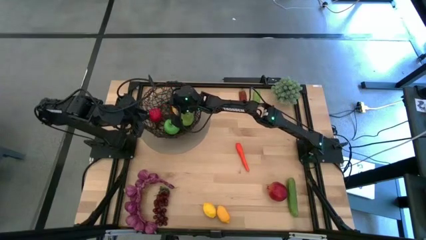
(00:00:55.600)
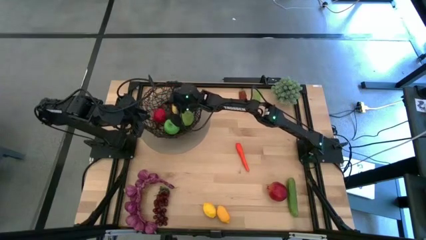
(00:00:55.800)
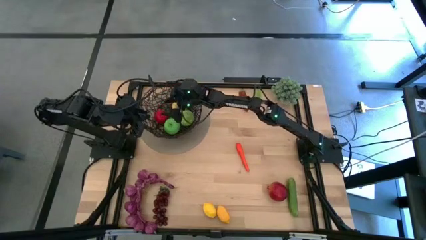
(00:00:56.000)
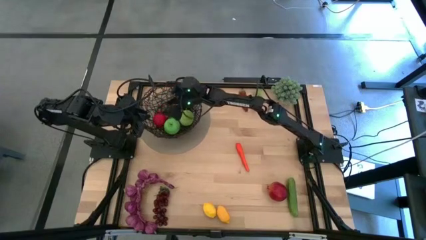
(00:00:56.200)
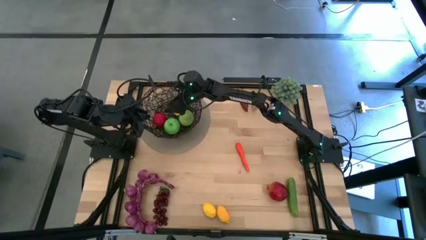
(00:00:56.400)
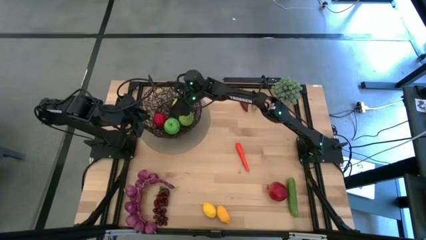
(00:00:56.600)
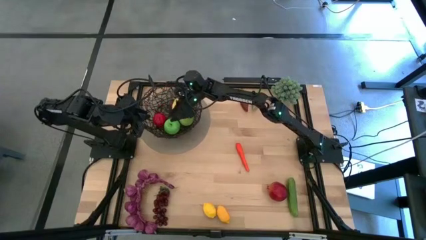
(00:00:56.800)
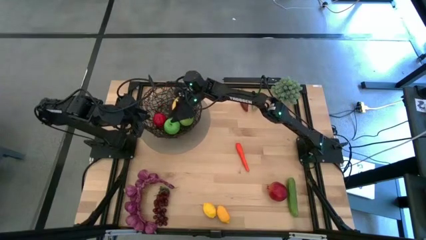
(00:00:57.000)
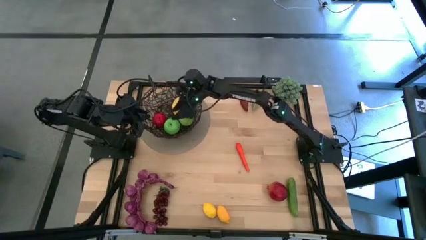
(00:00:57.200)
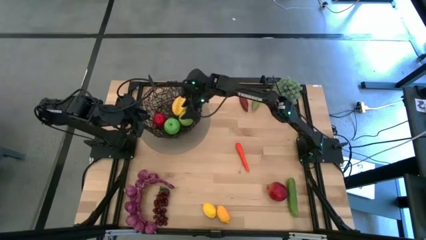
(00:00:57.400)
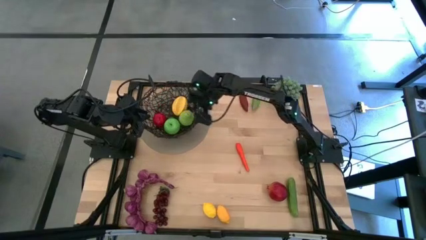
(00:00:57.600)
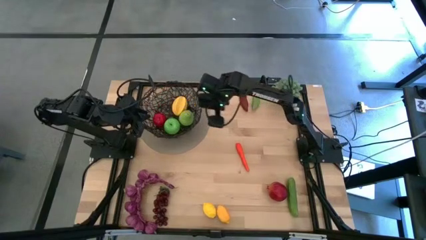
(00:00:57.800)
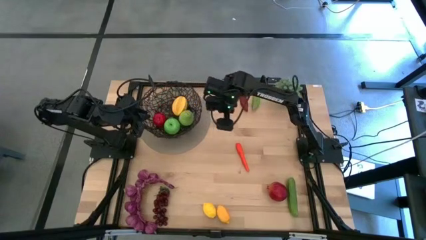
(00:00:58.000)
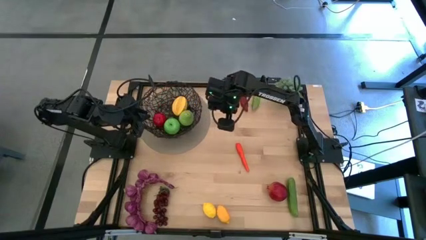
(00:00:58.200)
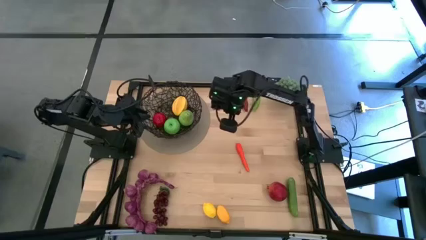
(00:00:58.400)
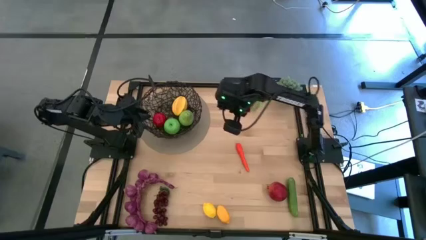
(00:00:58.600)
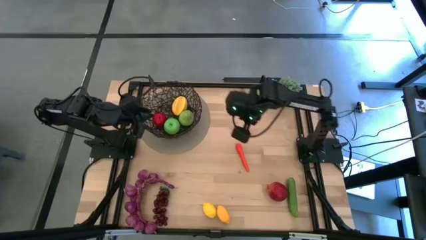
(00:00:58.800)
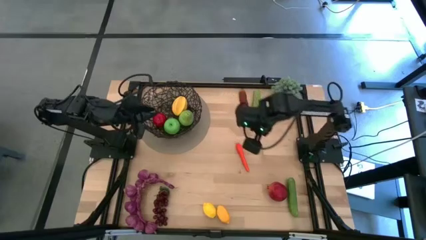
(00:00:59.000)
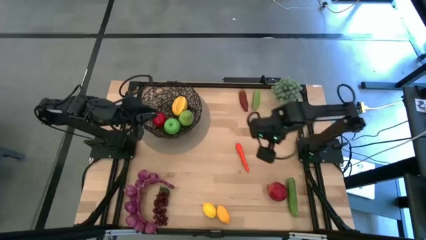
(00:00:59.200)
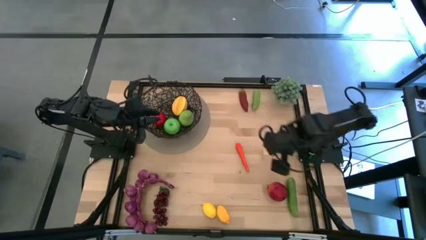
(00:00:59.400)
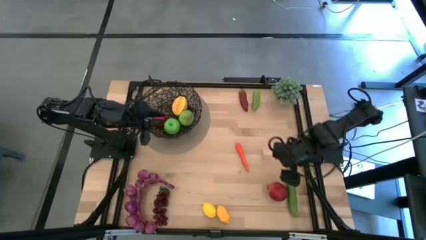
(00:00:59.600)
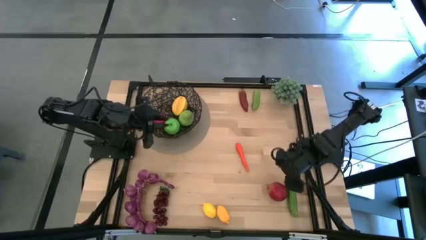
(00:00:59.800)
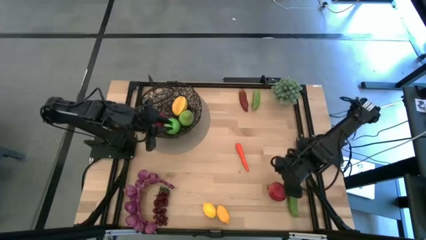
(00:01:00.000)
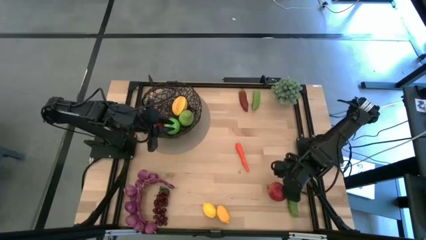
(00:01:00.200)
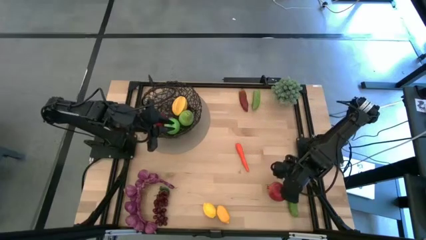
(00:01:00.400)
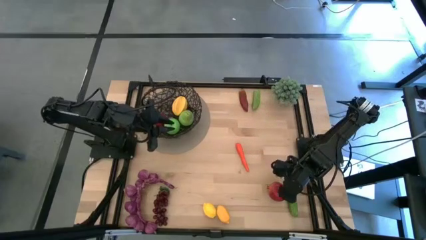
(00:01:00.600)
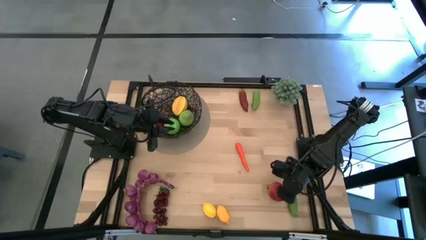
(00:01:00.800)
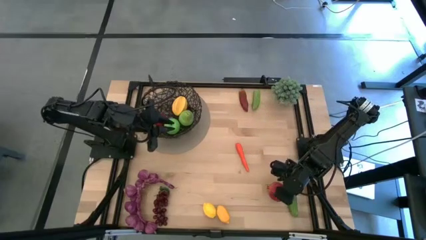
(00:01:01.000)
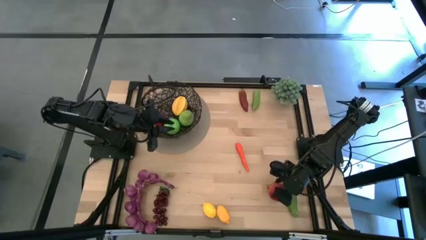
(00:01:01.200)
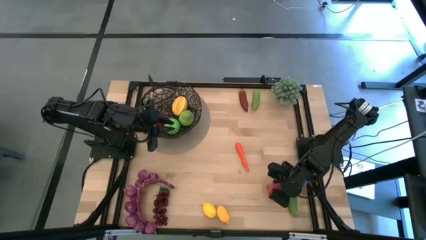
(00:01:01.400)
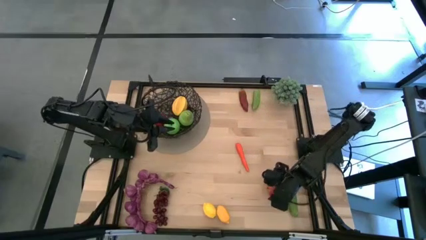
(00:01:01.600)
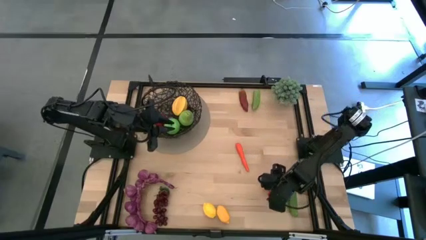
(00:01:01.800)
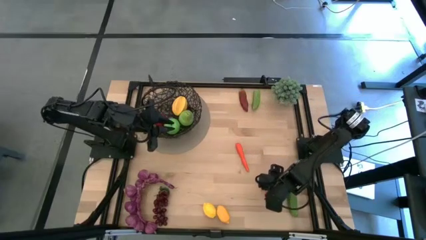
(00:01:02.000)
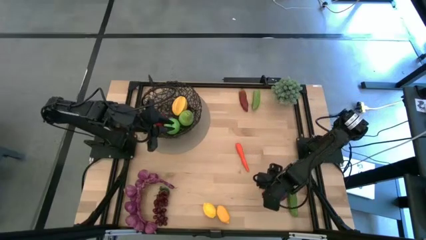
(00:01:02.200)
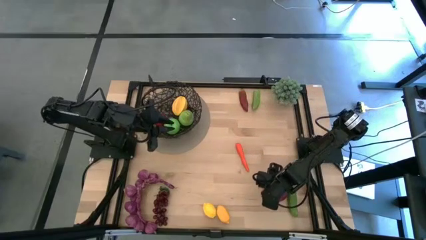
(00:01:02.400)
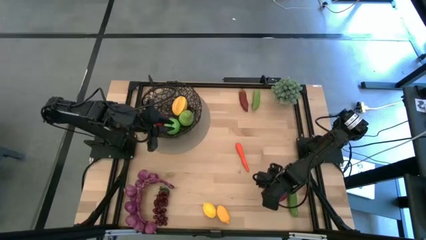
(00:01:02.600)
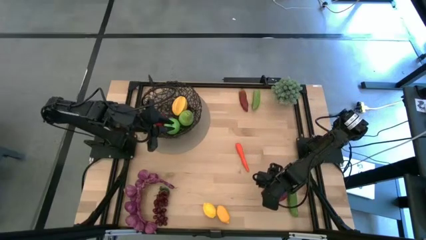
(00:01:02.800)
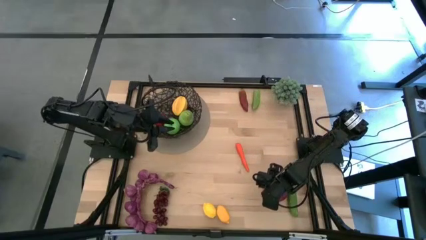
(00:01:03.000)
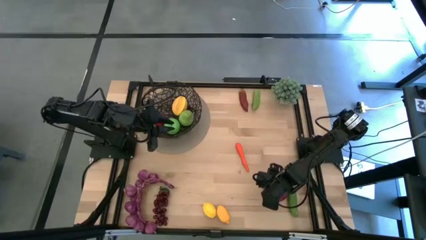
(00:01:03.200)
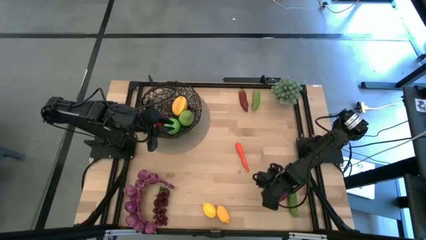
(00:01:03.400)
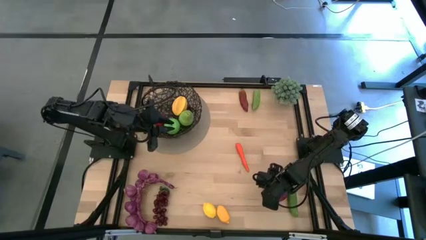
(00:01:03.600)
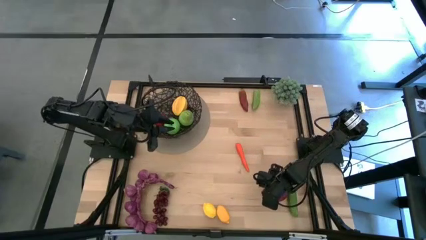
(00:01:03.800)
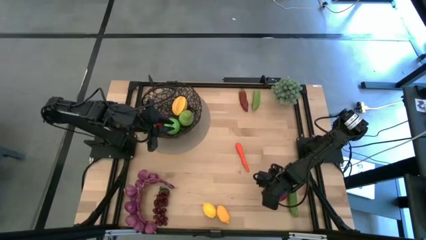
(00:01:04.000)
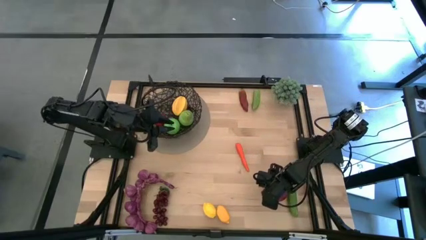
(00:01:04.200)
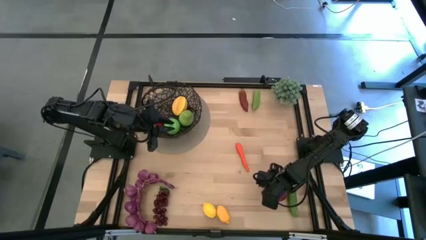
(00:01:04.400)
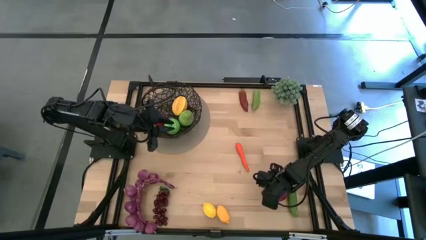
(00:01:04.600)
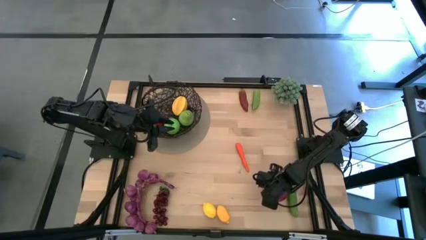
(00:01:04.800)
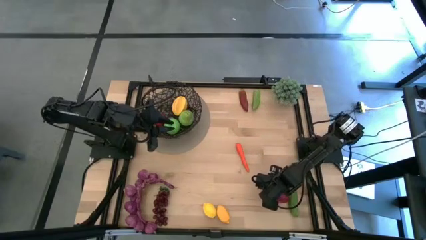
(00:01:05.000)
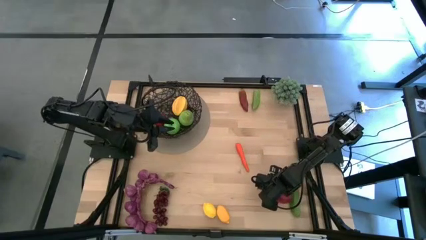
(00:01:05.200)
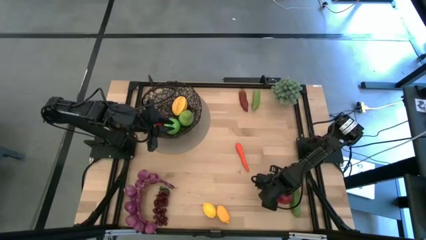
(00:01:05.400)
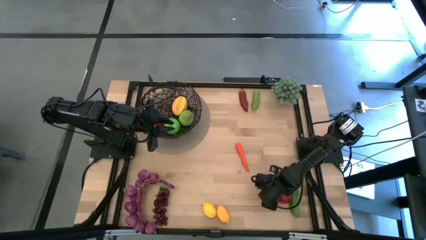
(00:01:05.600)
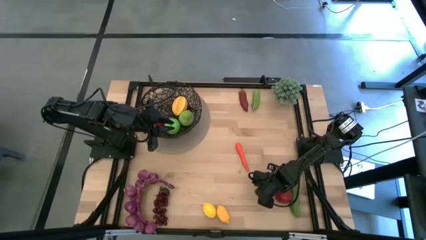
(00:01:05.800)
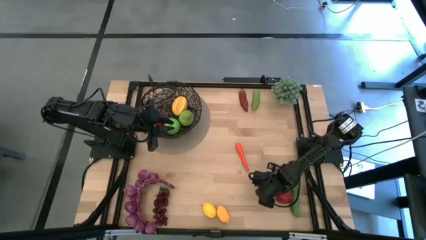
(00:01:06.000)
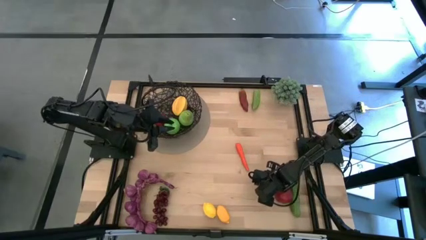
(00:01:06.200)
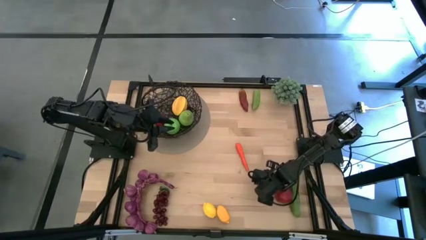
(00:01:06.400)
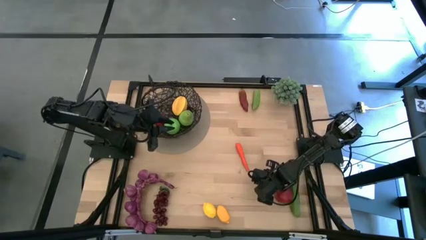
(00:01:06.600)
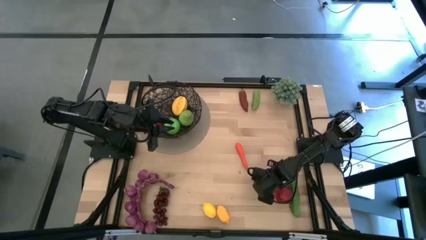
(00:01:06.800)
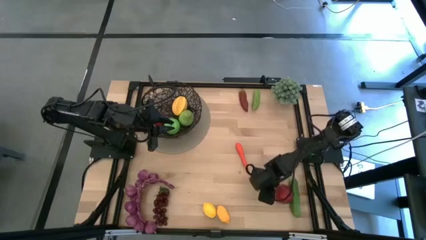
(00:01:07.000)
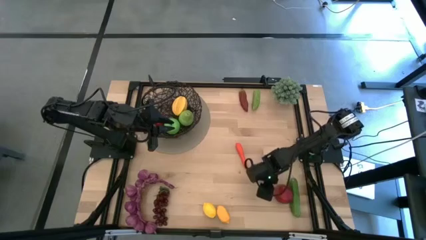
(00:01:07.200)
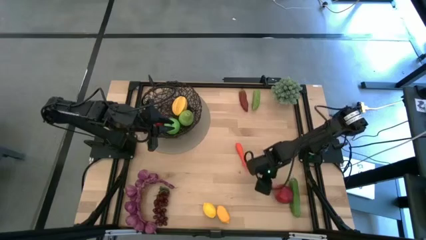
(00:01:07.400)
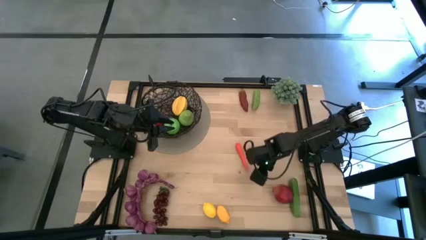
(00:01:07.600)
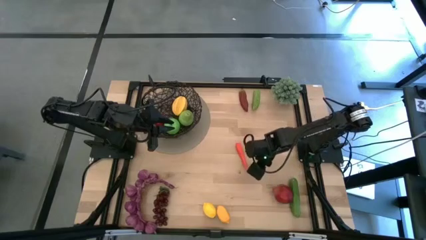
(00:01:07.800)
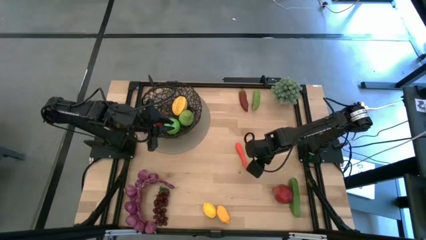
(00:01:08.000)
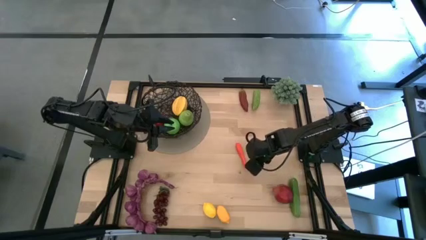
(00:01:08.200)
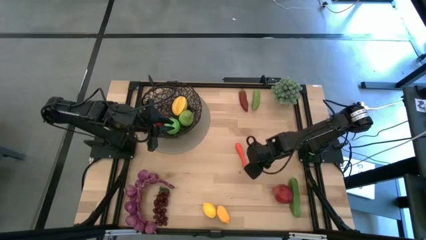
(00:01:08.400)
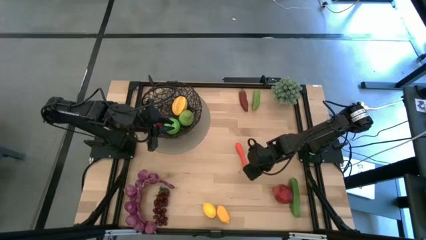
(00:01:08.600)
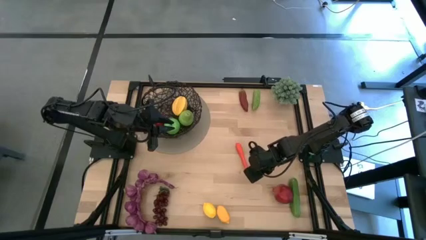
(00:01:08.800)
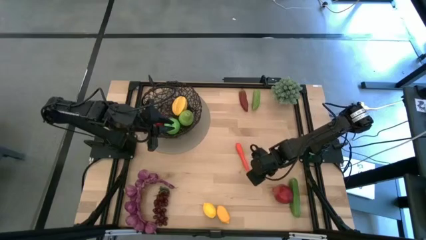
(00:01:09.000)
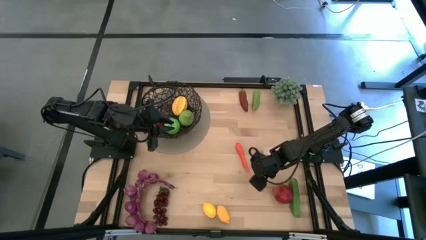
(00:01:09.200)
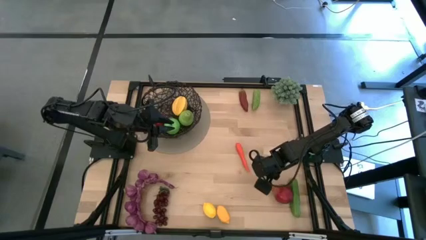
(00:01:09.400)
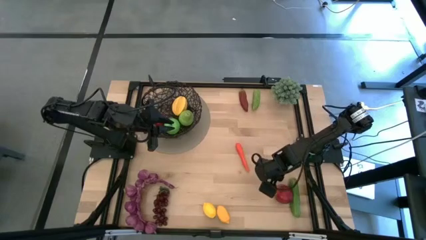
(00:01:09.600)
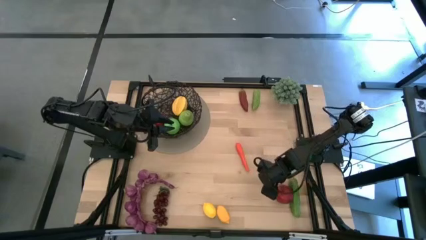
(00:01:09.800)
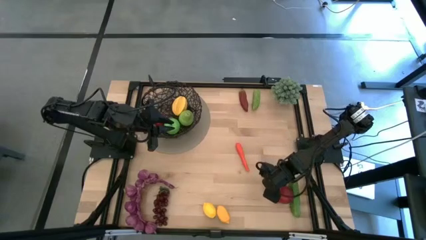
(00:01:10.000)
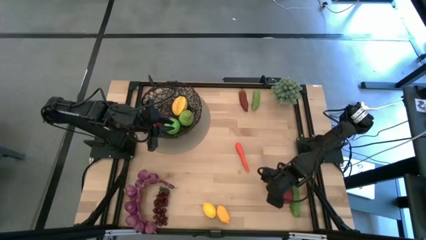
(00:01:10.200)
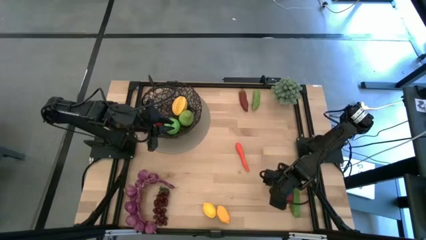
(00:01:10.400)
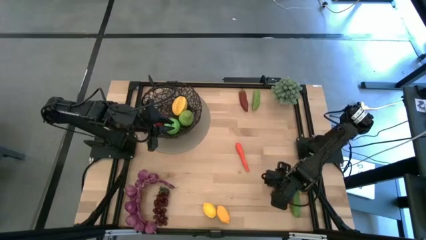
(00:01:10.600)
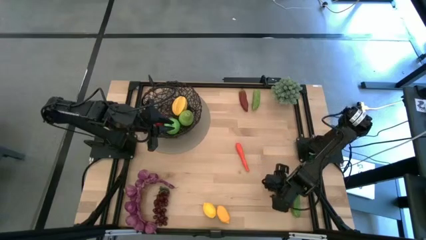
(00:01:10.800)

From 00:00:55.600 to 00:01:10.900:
Task: Build produce basket
Put the red pomegranate into the black wire basket
